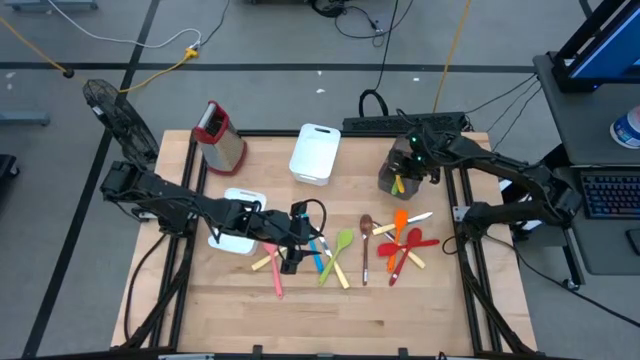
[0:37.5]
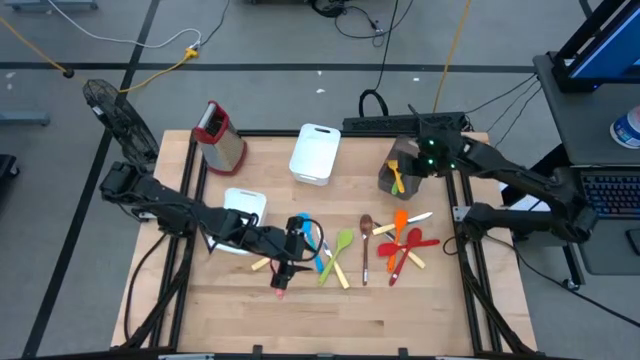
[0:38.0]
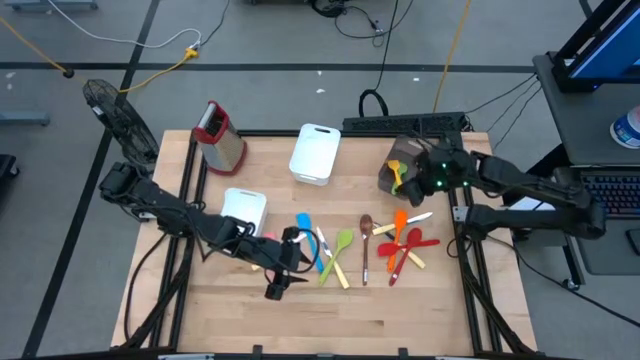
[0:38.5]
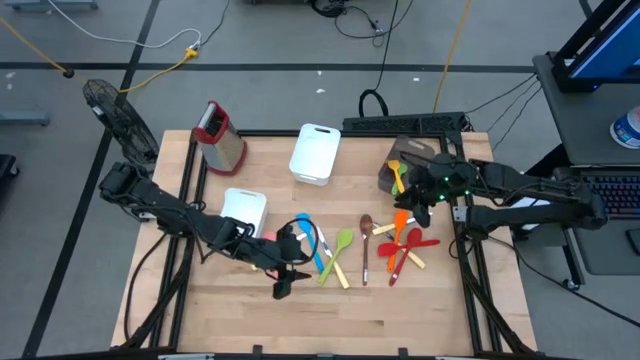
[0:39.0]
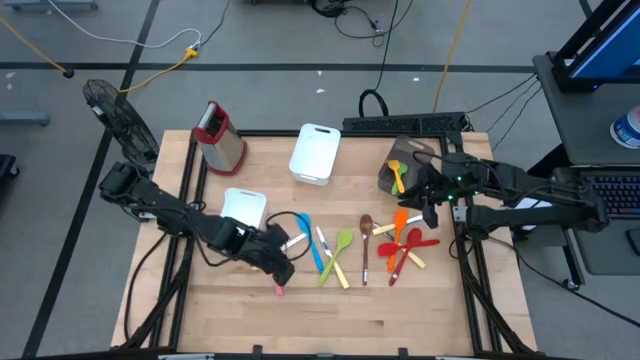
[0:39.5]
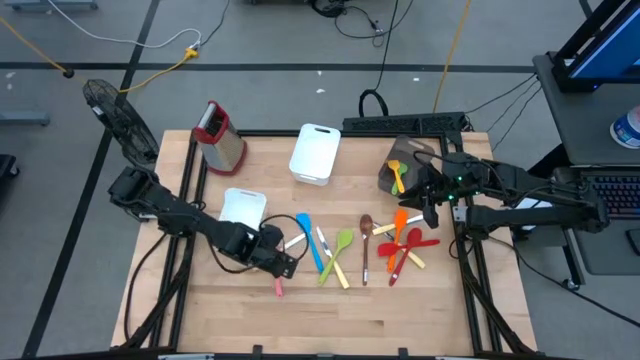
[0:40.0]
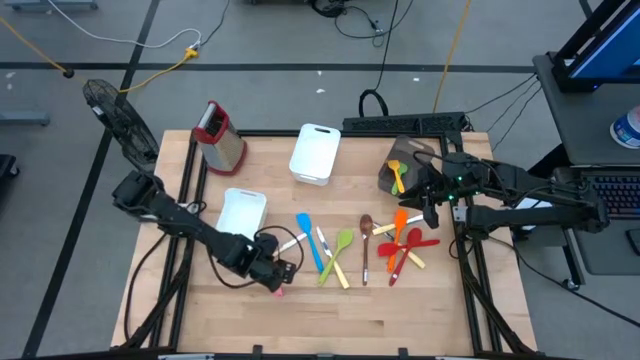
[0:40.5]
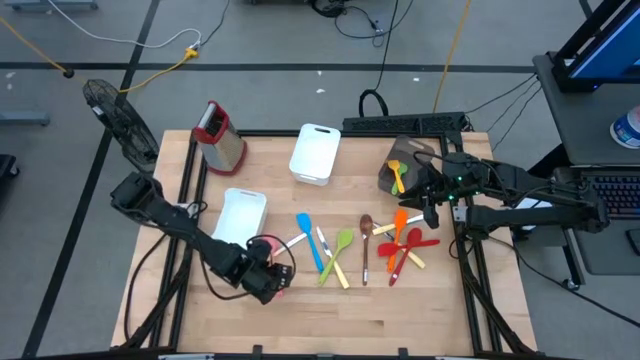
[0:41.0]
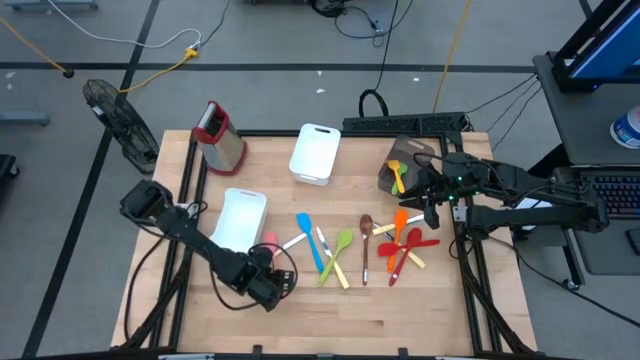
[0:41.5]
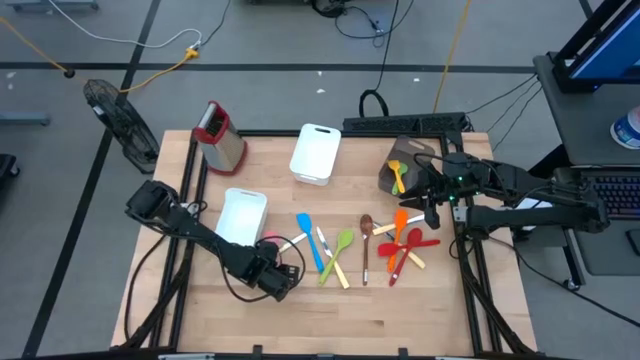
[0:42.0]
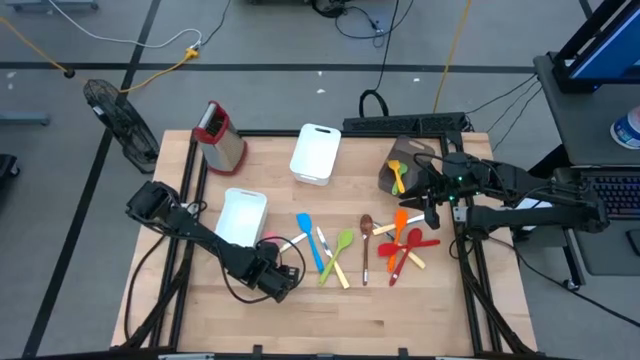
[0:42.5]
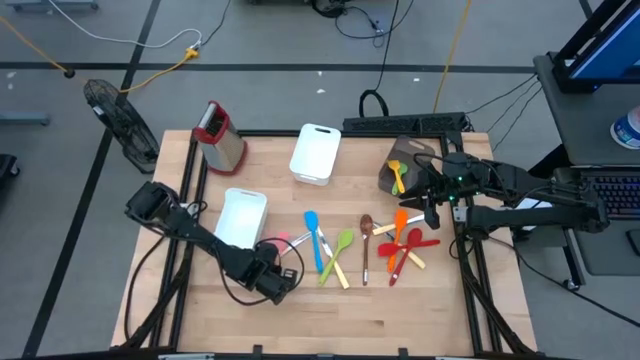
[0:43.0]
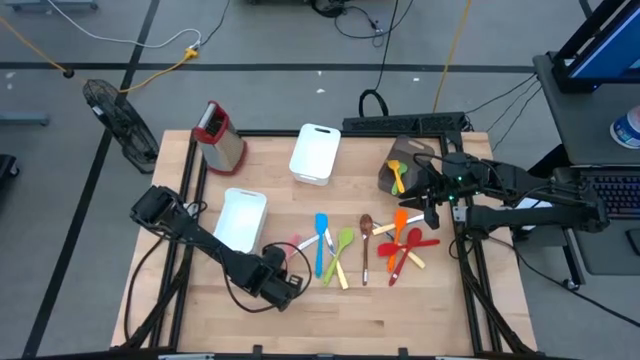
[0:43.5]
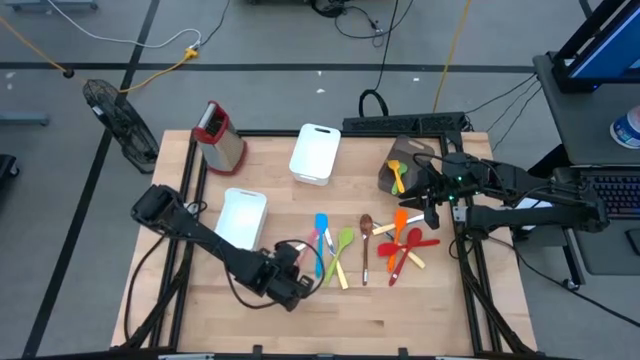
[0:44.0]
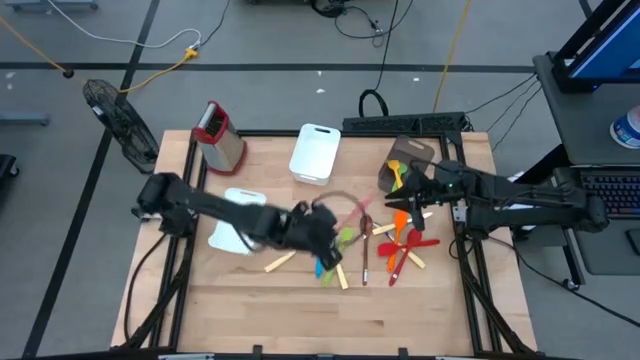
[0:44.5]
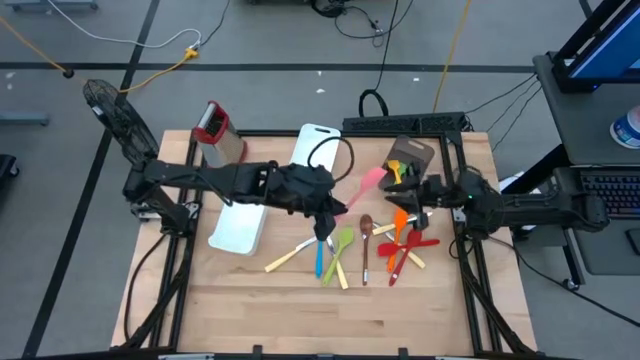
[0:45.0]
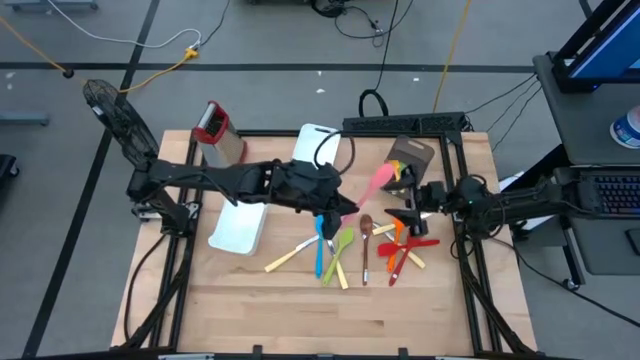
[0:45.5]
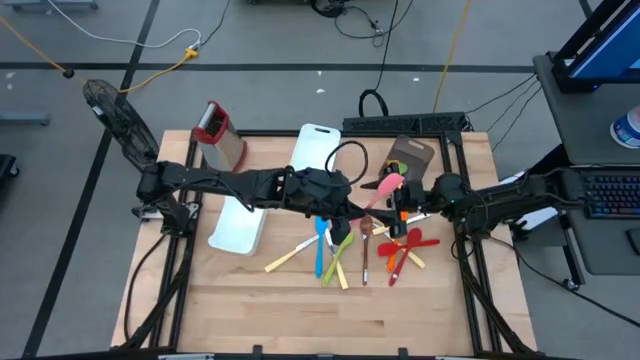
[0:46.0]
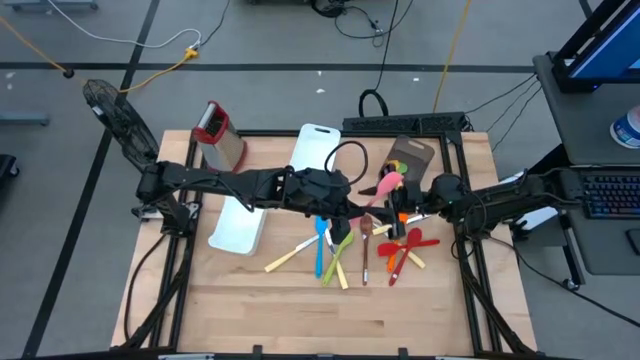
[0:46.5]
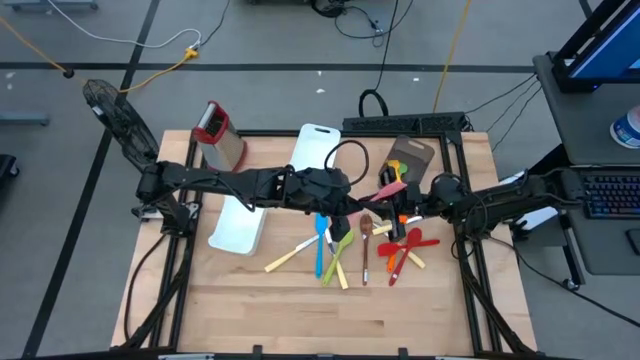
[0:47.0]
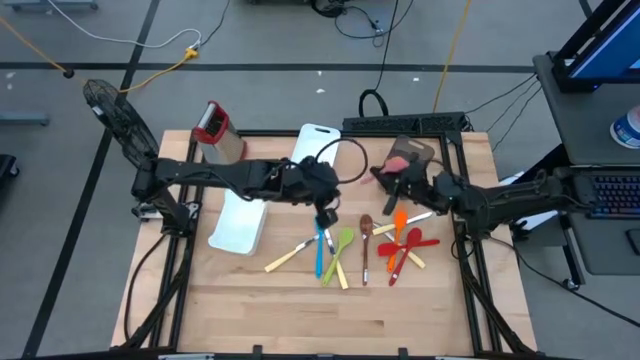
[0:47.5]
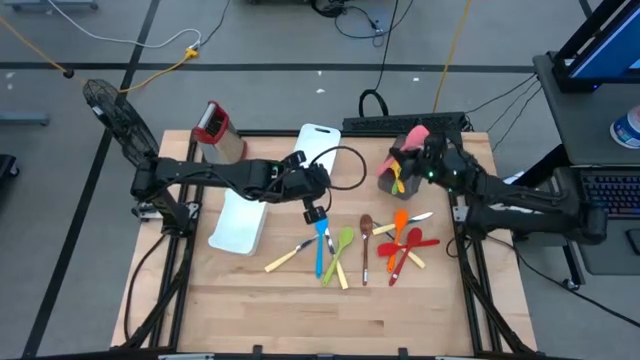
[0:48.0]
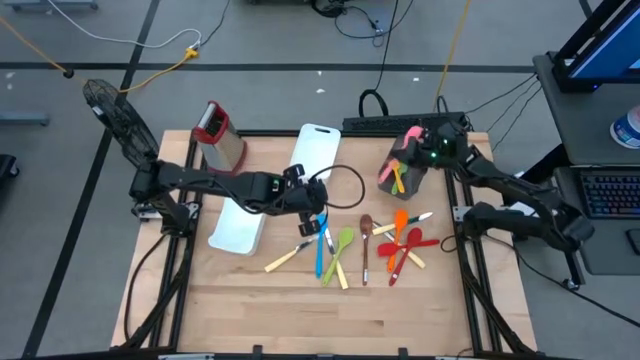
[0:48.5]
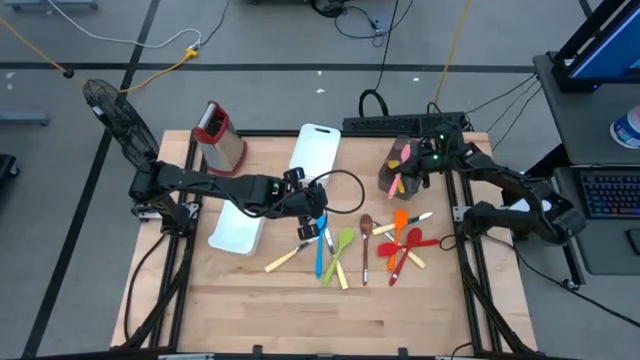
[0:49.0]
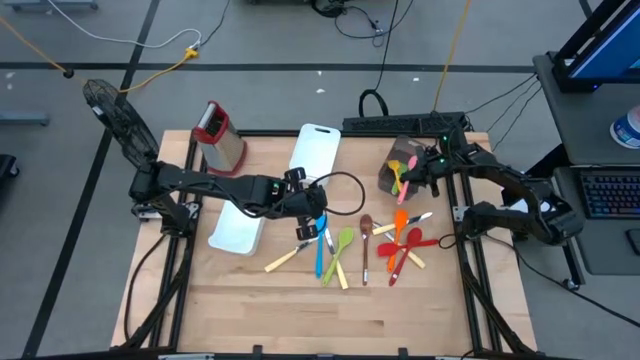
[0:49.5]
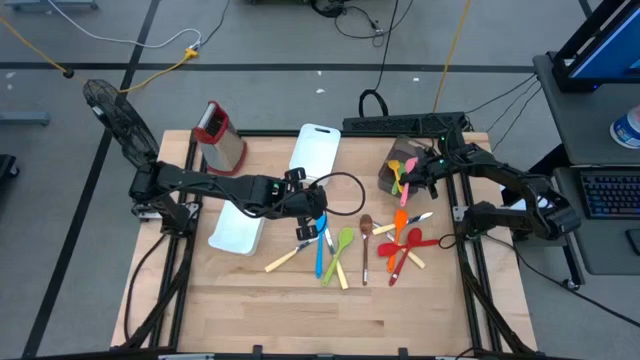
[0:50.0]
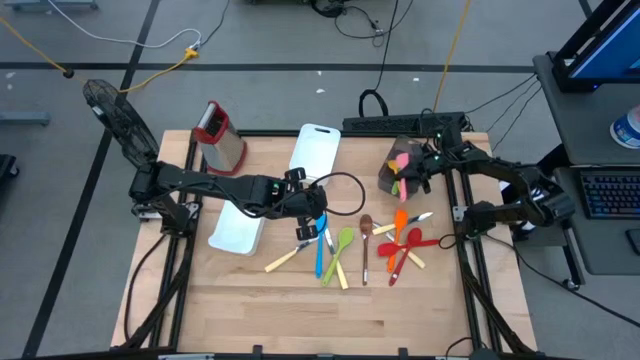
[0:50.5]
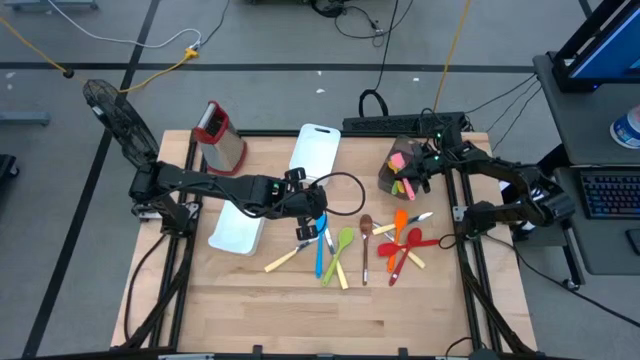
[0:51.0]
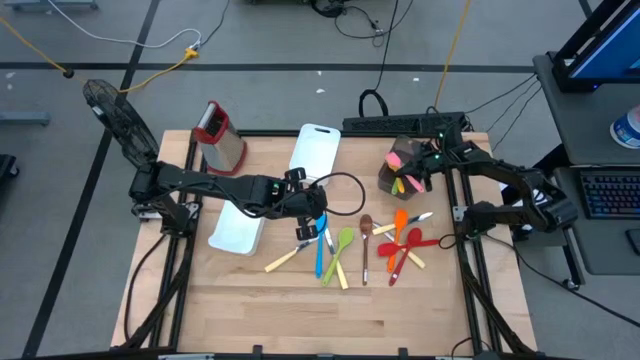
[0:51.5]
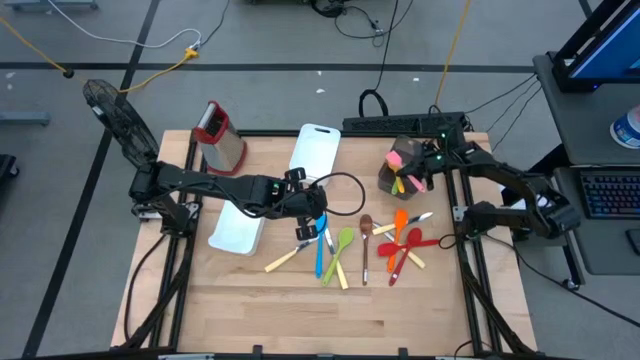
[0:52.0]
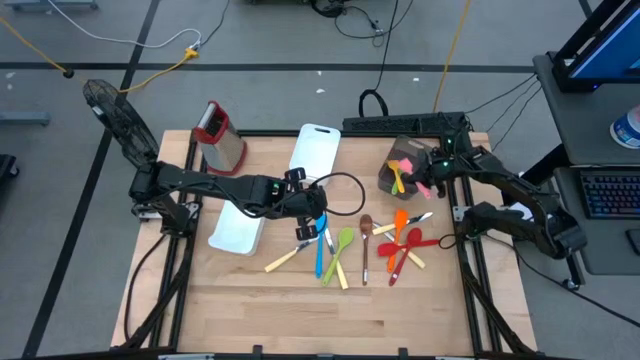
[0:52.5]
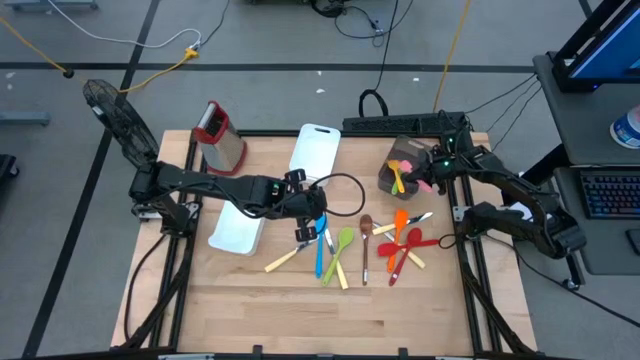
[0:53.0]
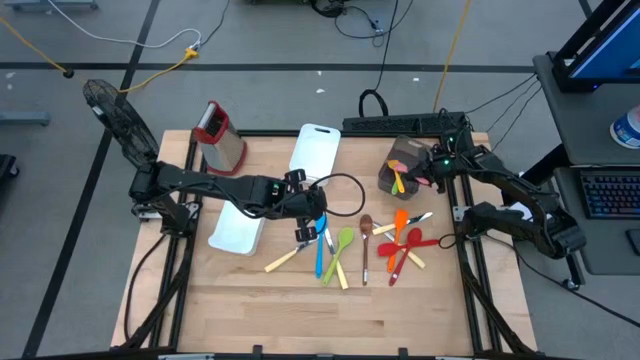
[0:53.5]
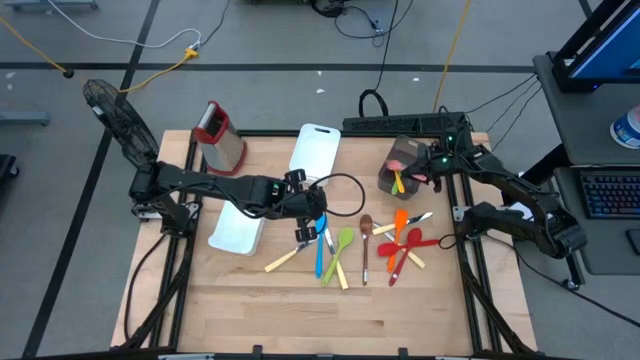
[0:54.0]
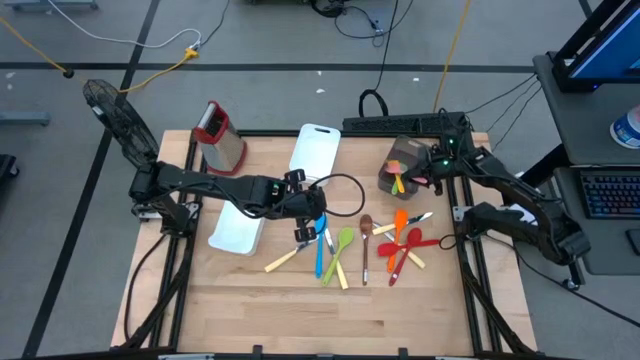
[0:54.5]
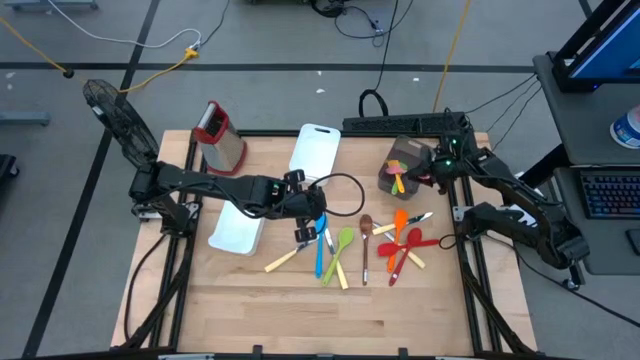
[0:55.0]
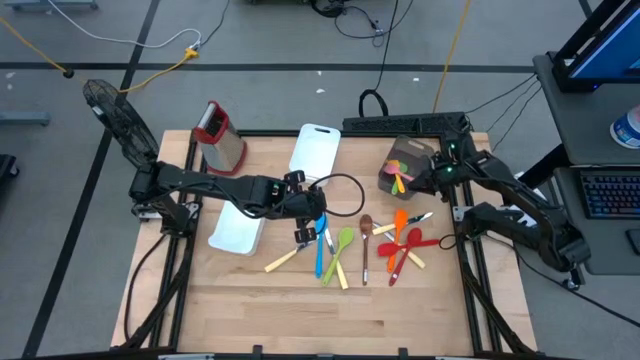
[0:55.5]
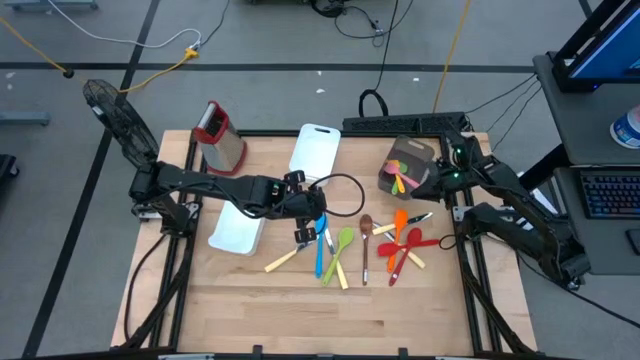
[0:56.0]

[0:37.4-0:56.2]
Task: Pick & Place Kitchen Items
Put the pink spatula into the black bin

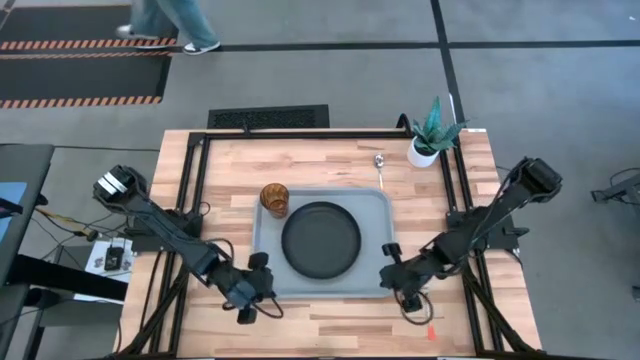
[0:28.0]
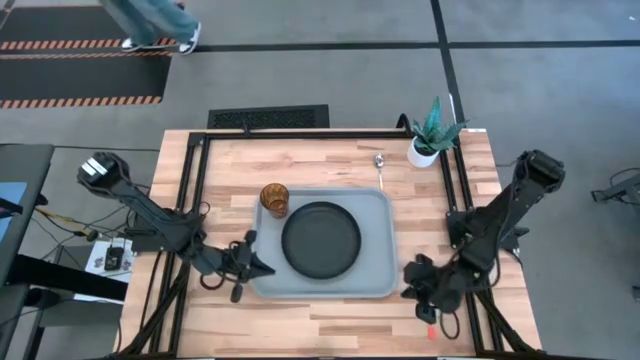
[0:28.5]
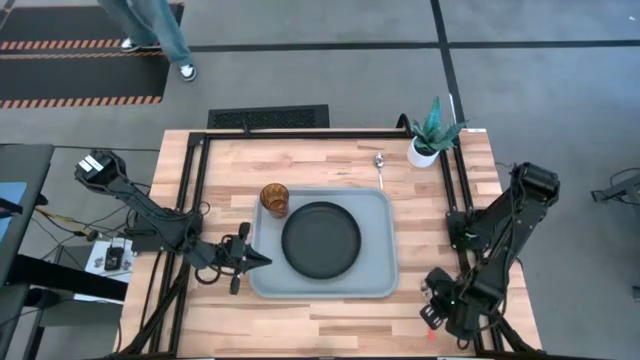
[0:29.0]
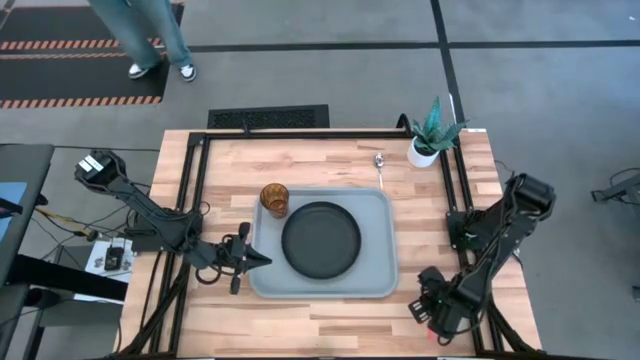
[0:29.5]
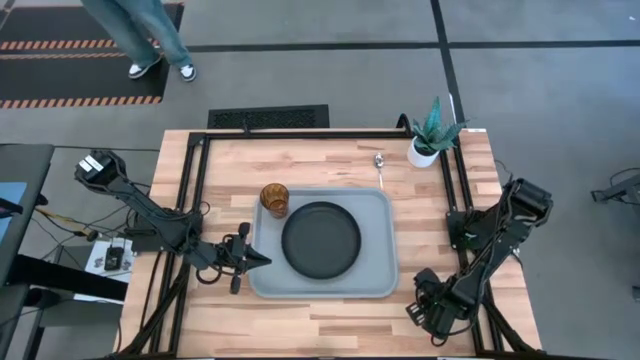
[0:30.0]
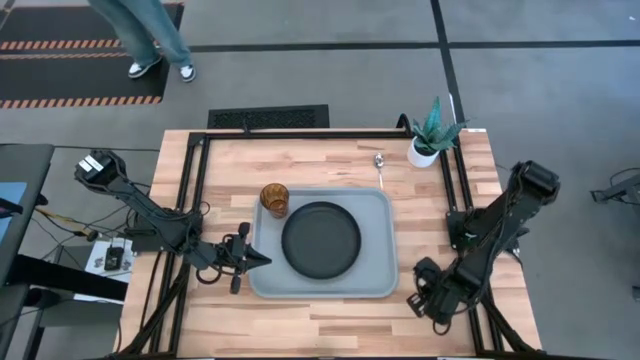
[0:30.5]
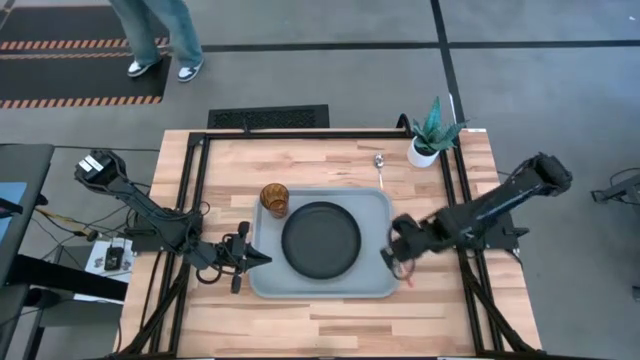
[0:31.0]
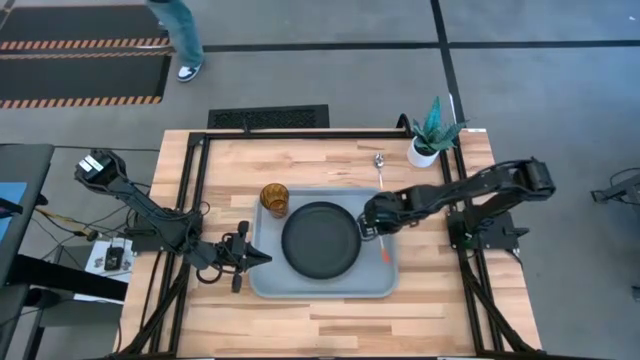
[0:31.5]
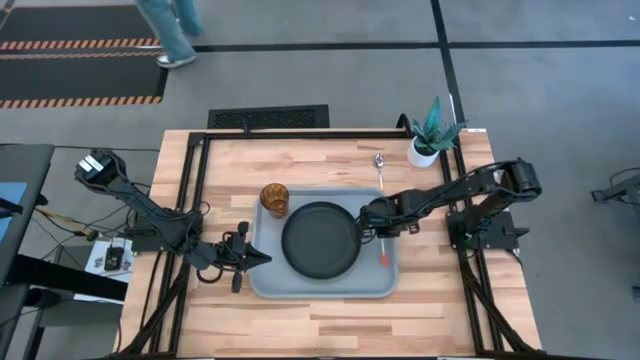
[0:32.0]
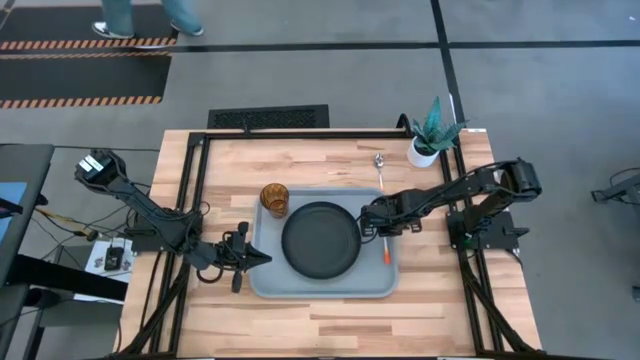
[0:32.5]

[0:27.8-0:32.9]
Task: Pick and place plate/cup/fork/spoon on tray
Put the orange fork on the gray serving tray to the right of the black plate
